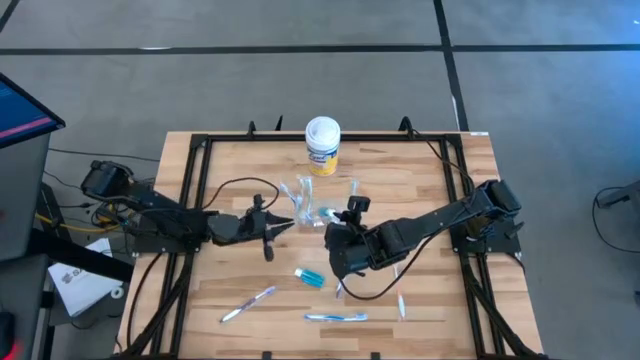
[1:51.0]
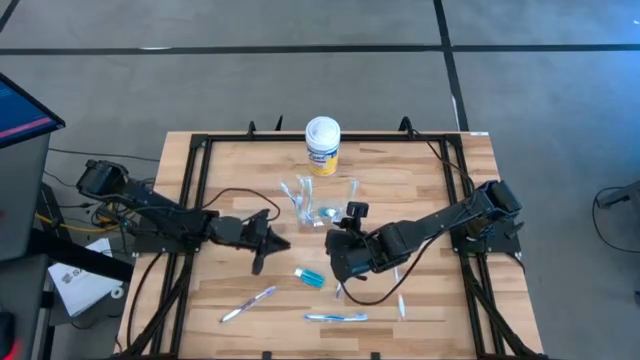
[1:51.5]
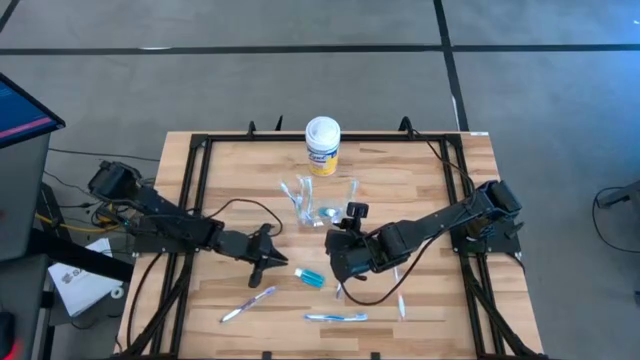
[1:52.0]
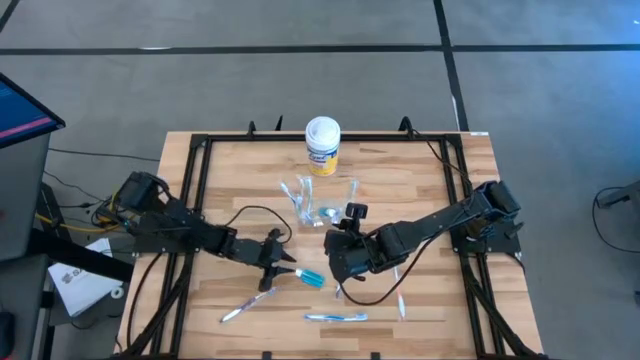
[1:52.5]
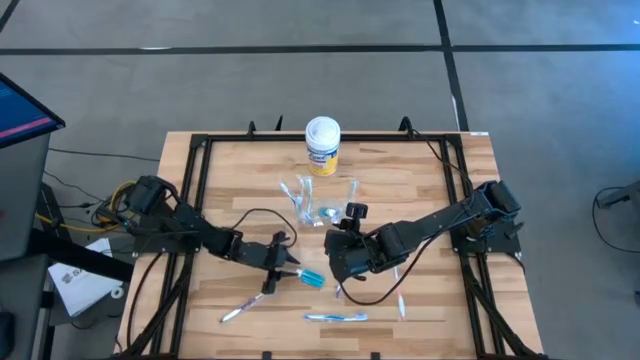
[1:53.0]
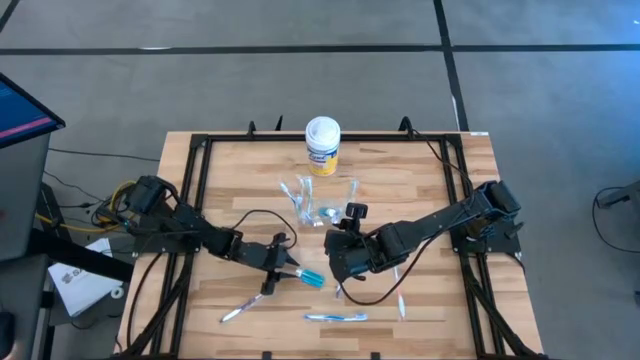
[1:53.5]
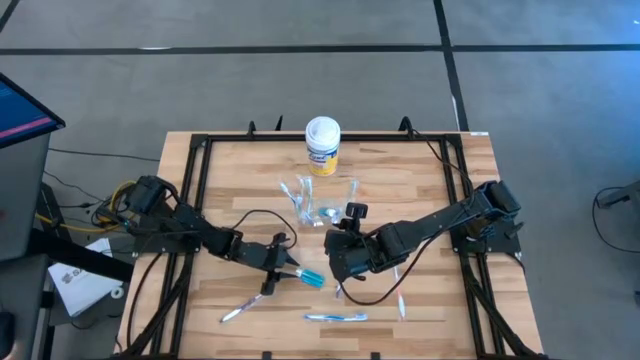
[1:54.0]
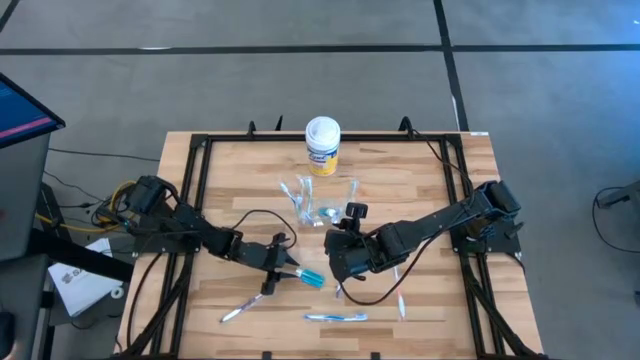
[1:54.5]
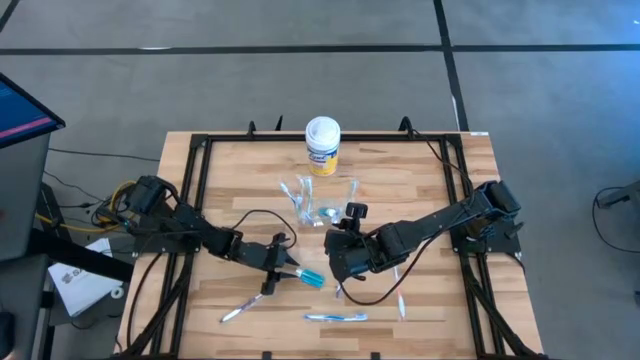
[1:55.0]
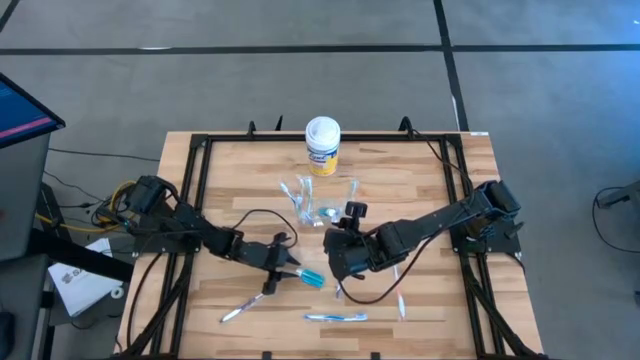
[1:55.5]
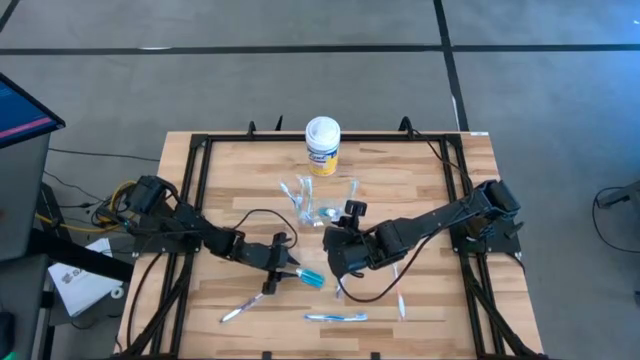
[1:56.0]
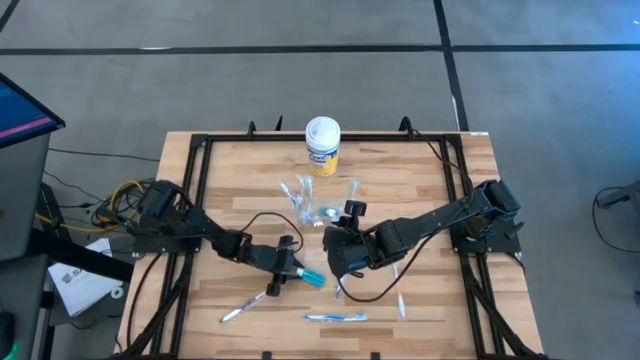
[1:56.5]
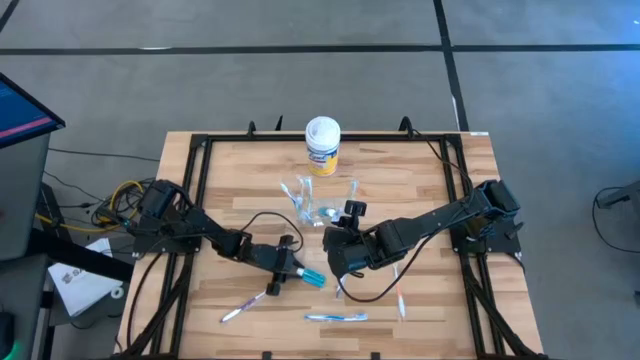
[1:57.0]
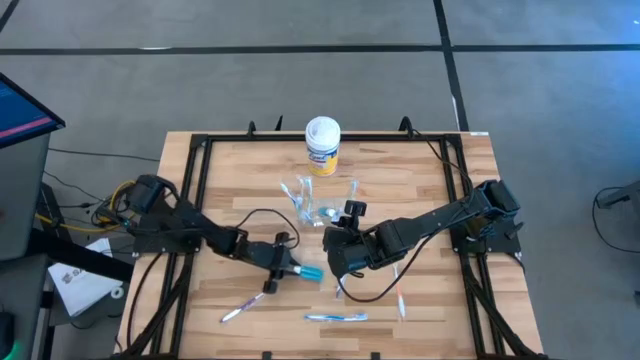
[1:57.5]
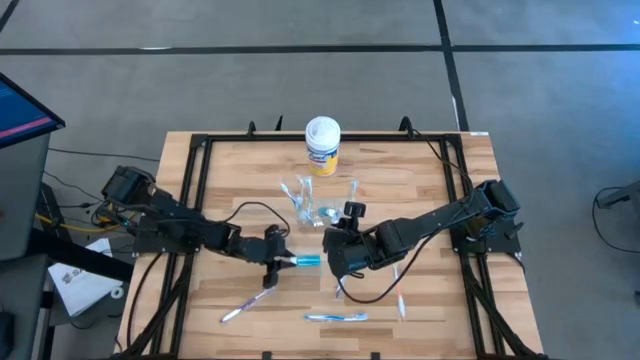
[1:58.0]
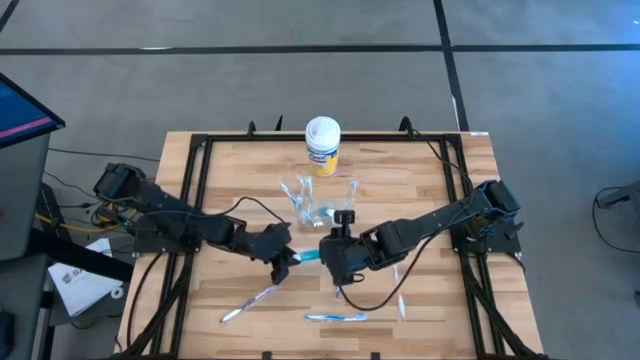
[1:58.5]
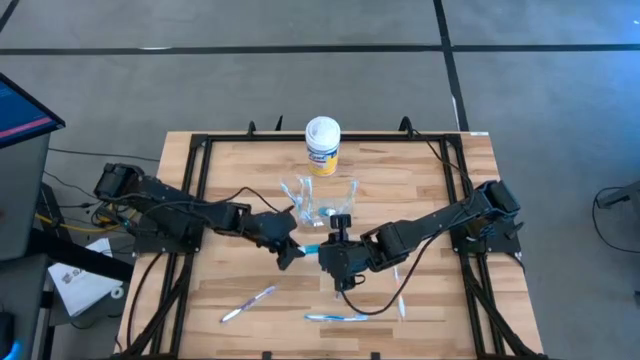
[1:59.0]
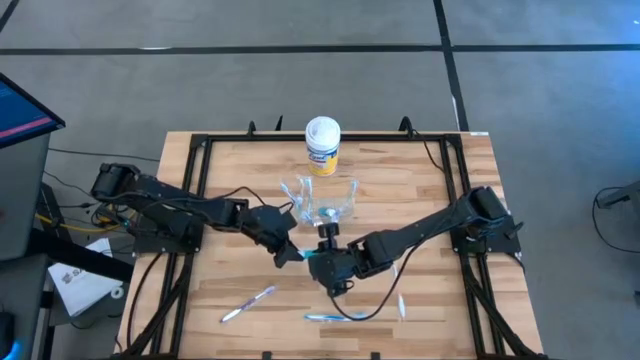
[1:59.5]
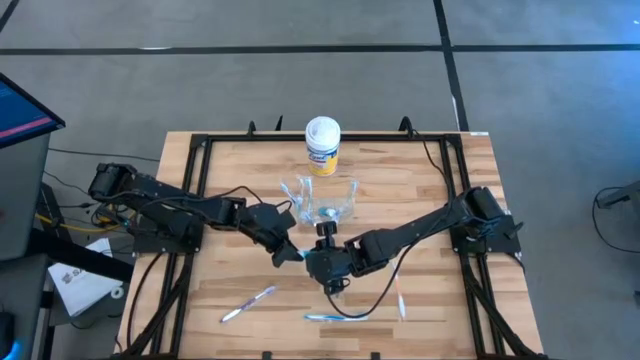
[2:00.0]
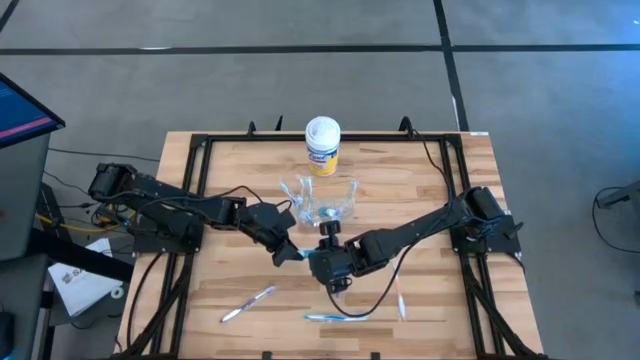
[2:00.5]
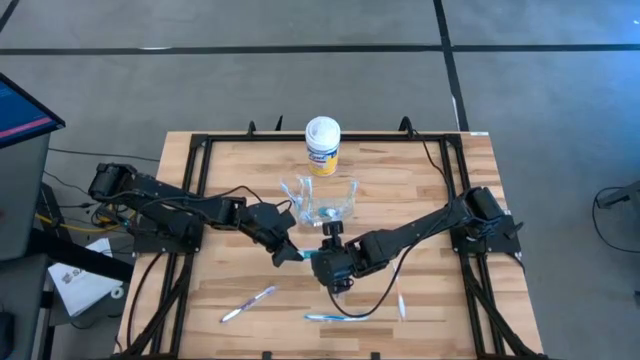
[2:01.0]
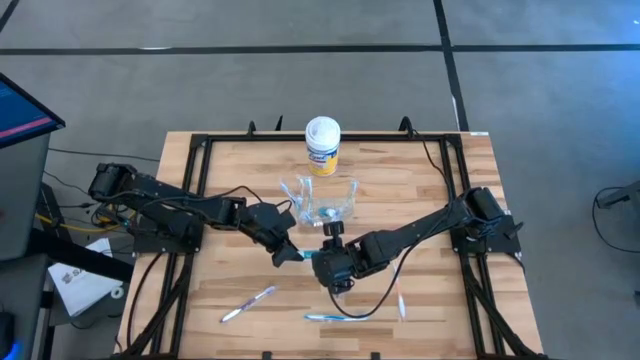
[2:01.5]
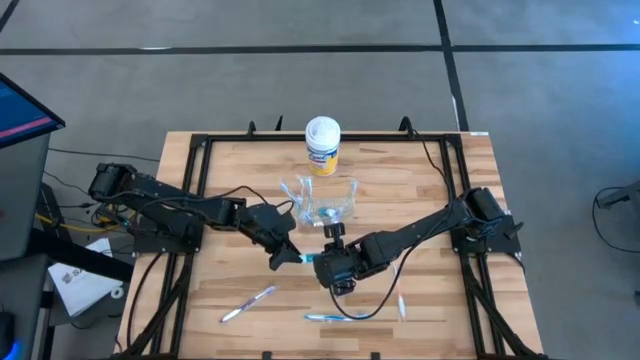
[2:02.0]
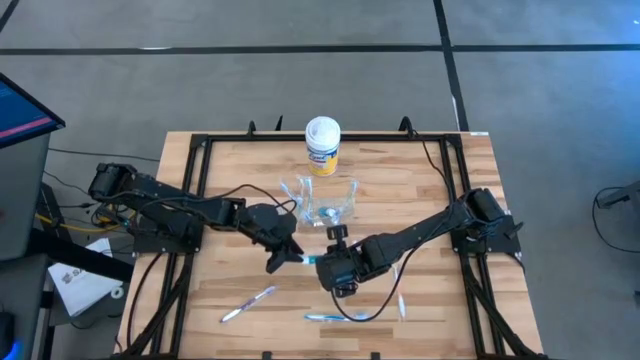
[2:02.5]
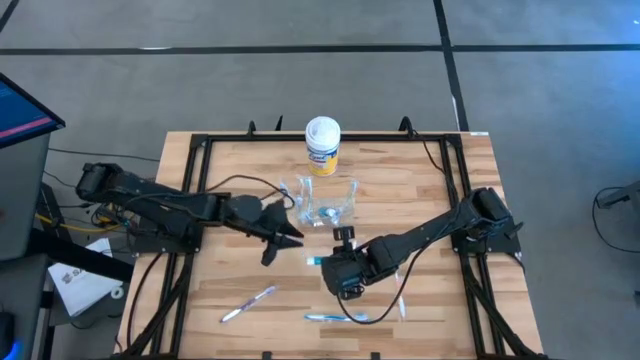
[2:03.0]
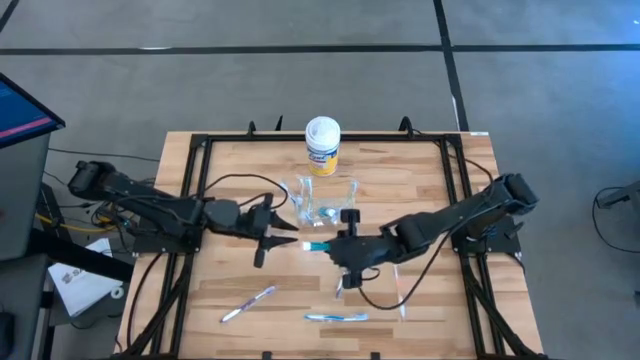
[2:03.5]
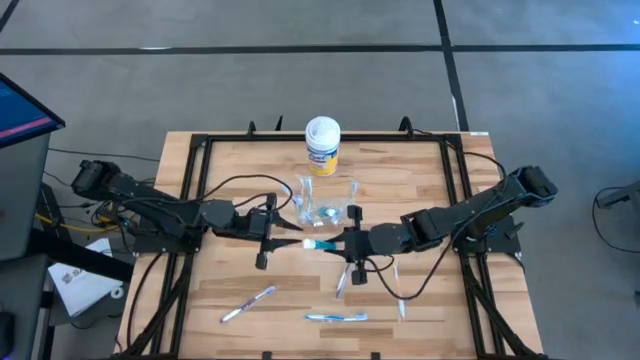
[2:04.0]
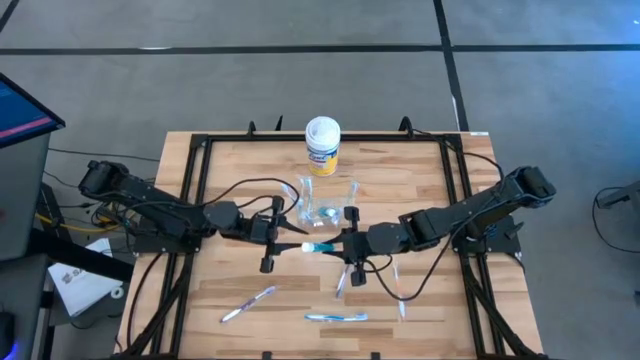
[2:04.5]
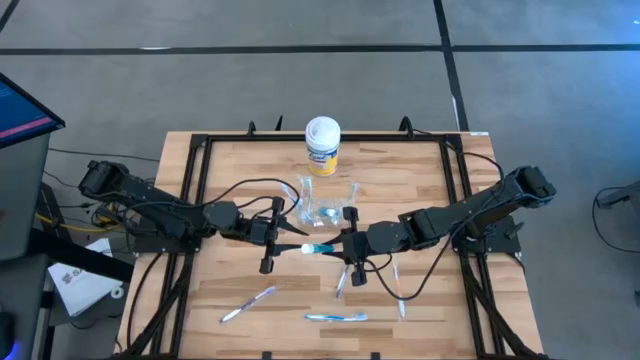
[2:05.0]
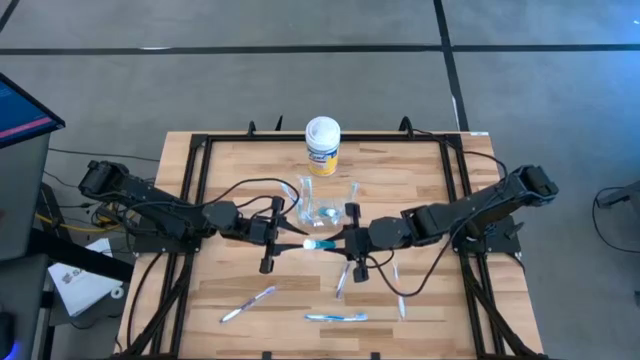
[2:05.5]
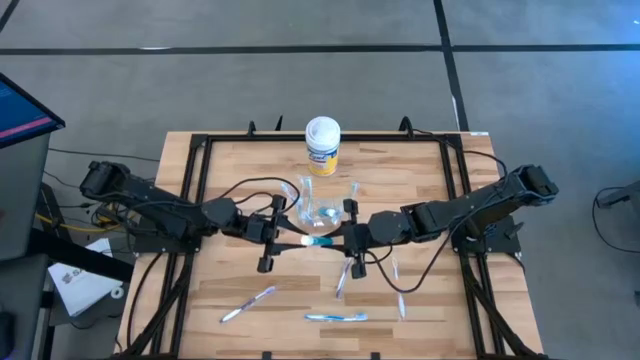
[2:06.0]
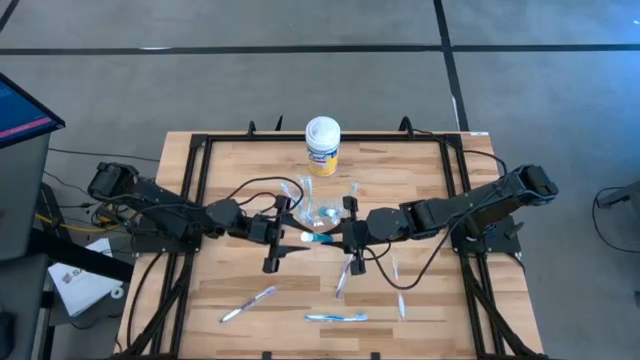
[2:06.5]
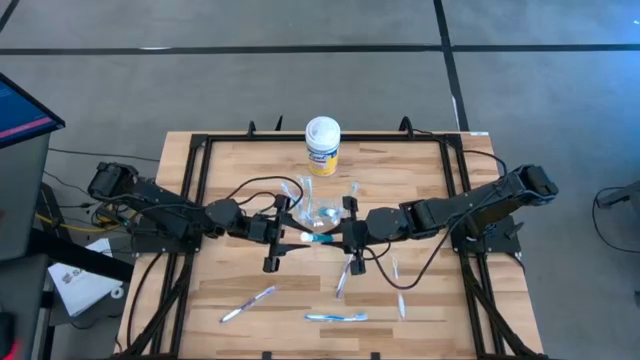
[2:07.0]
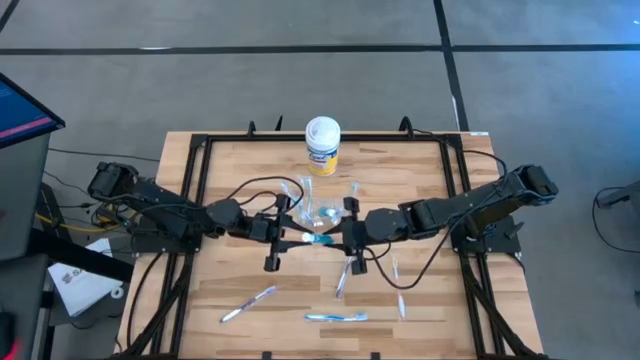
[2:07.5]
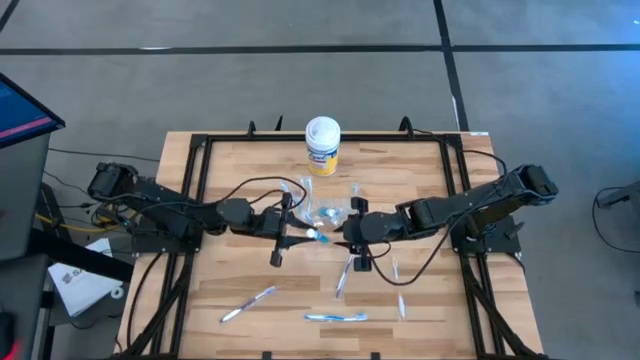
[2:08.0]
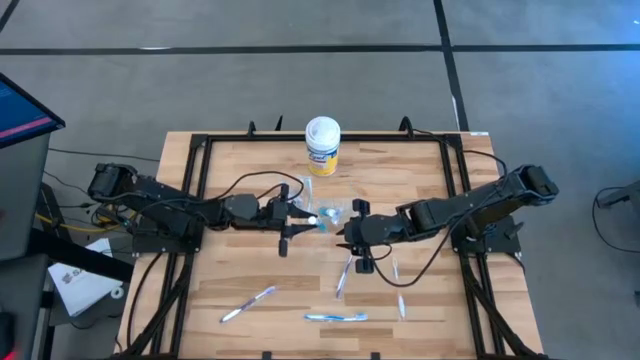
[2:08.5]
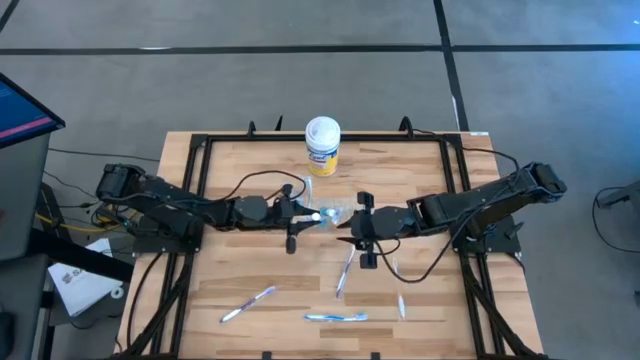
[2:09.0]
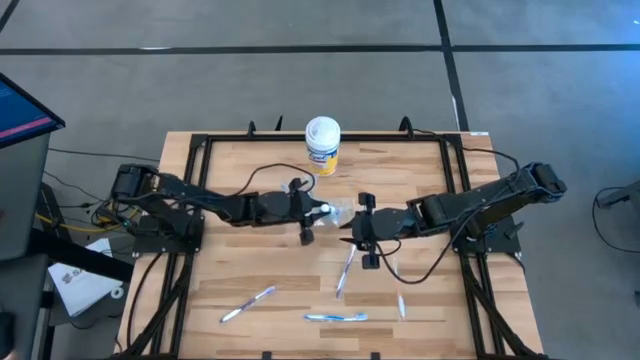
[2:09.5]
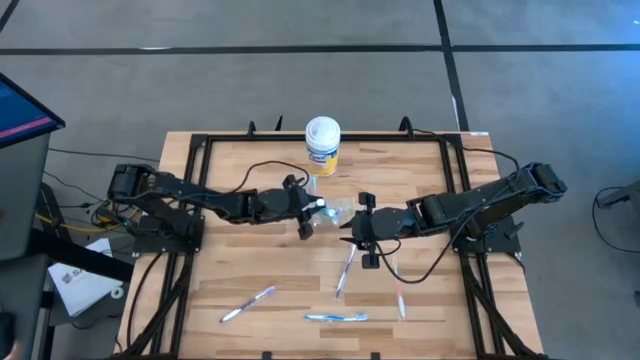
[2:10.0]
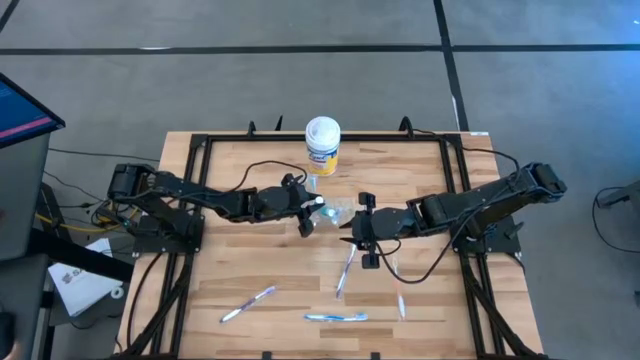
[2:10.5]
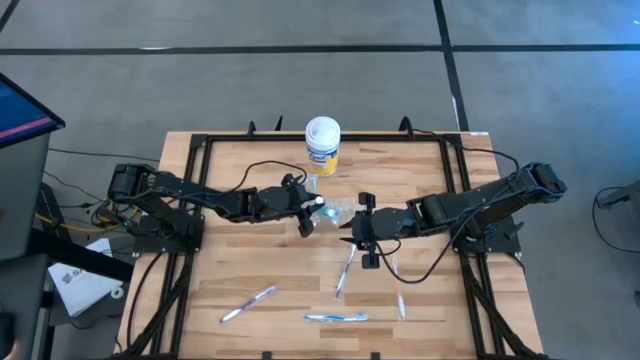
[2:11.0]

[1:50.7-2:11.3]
Task: Pick & Place toothbrushing station
Put the blue mouthwash into the transparent organizer

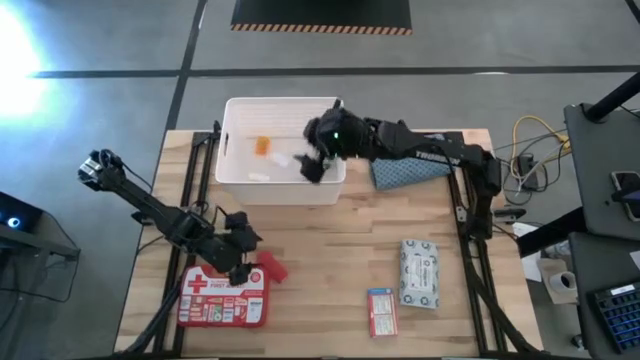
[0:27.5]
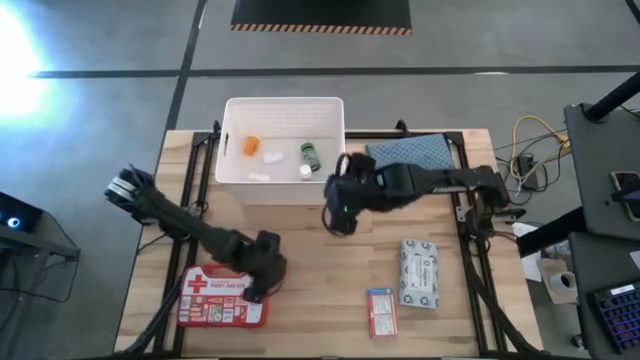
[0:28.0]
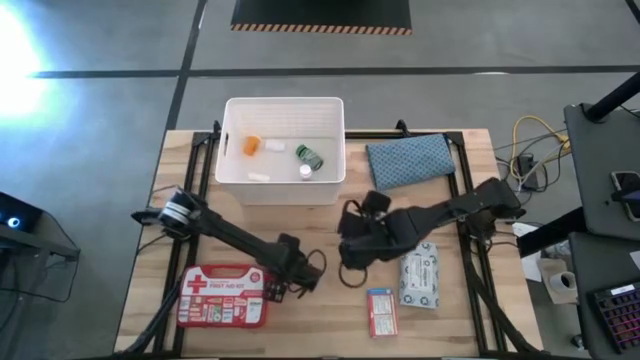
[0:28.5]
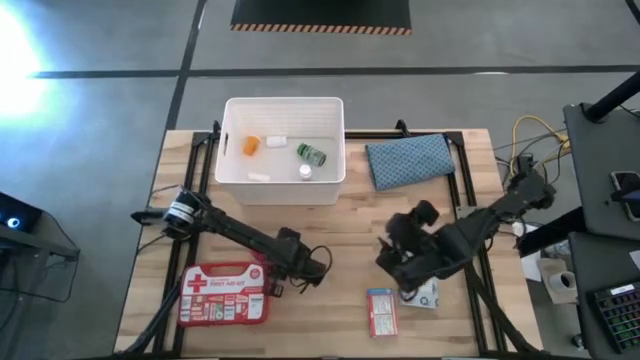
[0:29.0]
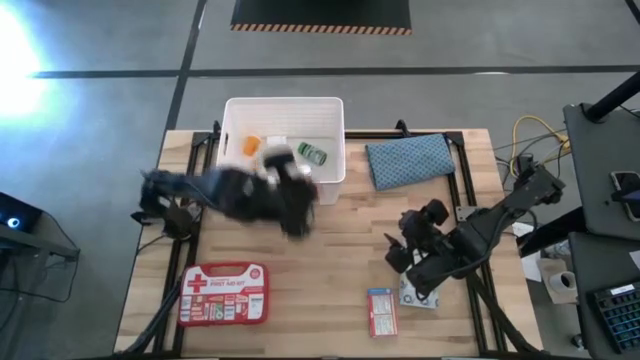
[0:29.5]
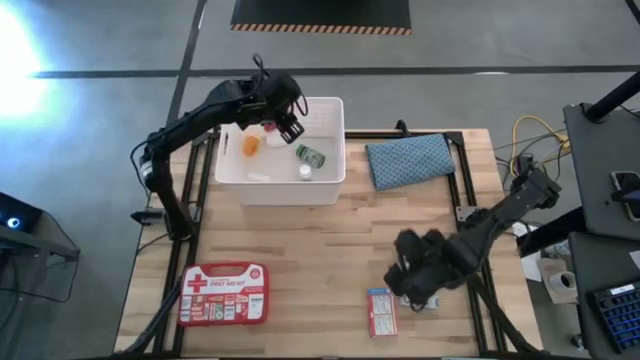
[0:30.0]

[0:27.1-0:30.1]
Task: Pick & place medical supplies in basket/bin
Put the red bandage into the white bin
